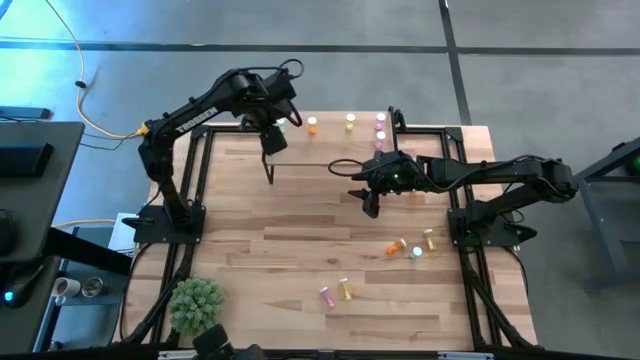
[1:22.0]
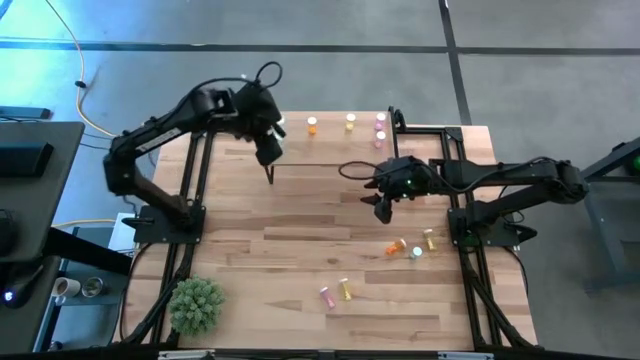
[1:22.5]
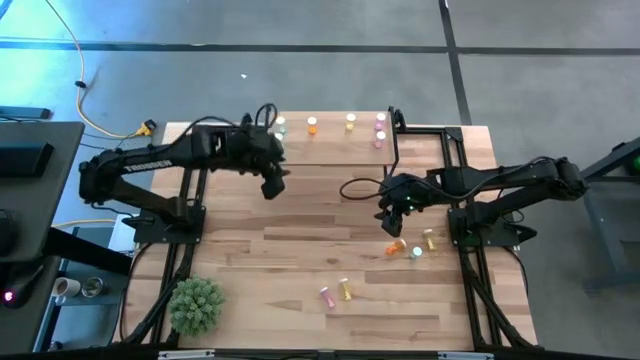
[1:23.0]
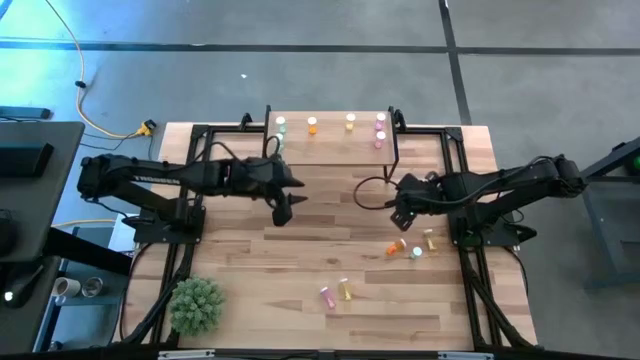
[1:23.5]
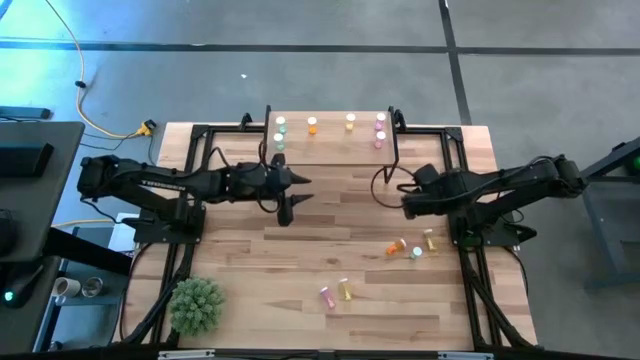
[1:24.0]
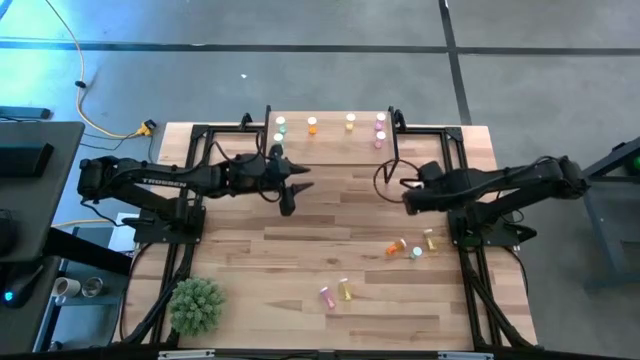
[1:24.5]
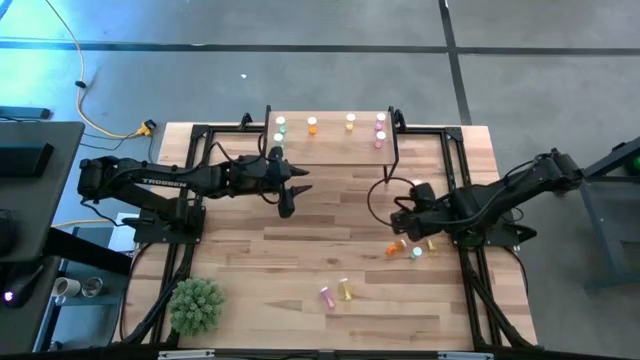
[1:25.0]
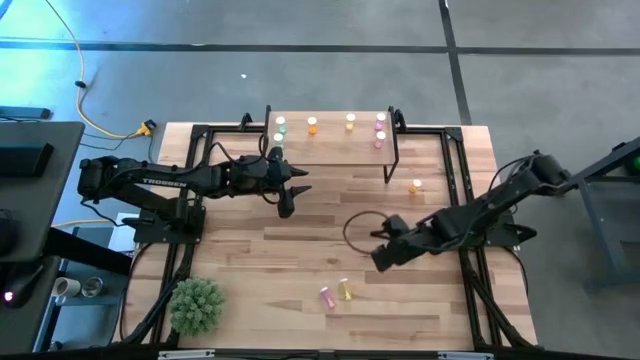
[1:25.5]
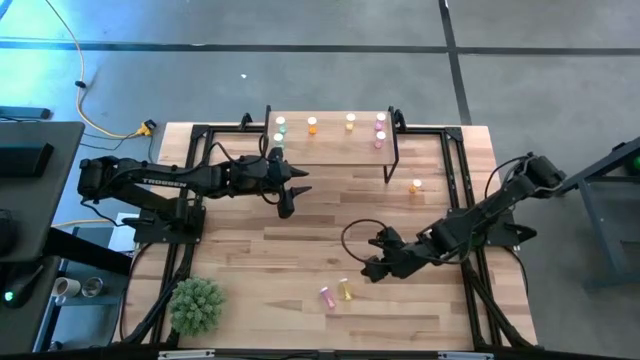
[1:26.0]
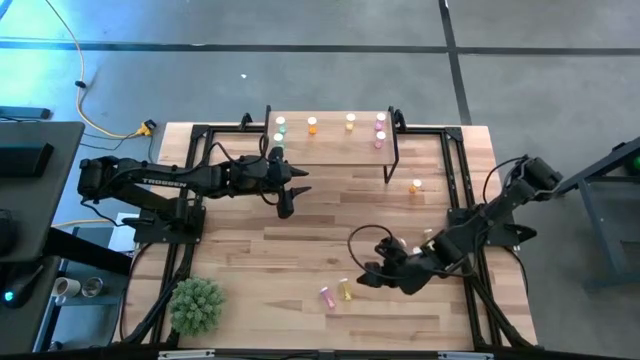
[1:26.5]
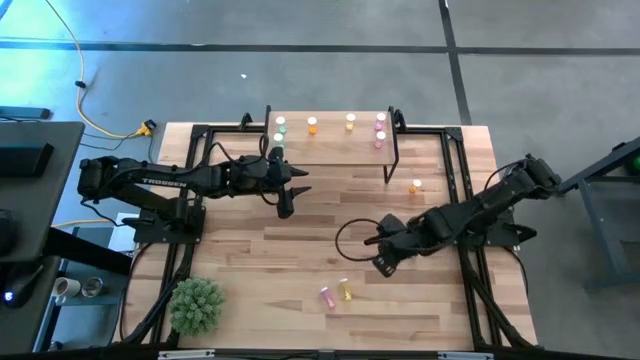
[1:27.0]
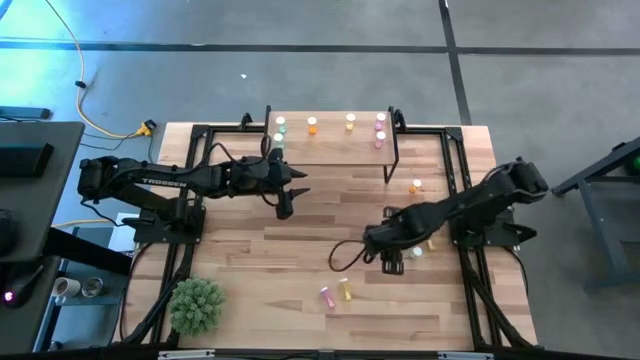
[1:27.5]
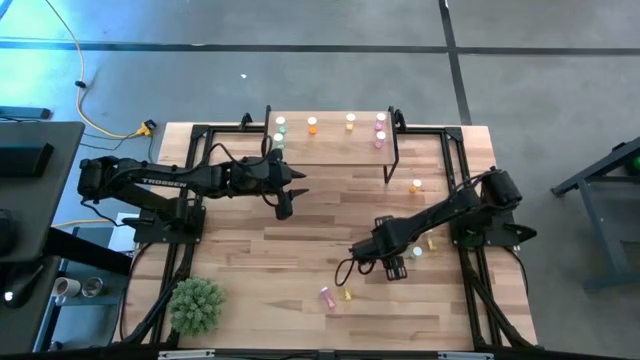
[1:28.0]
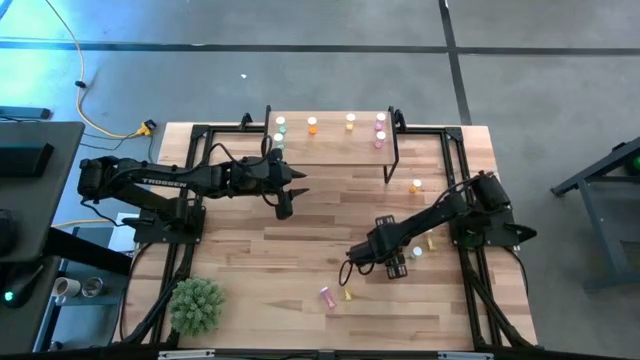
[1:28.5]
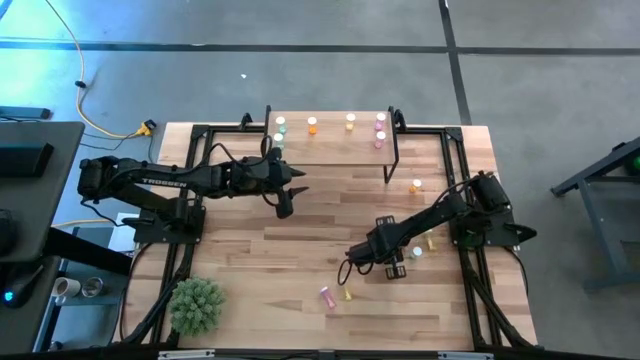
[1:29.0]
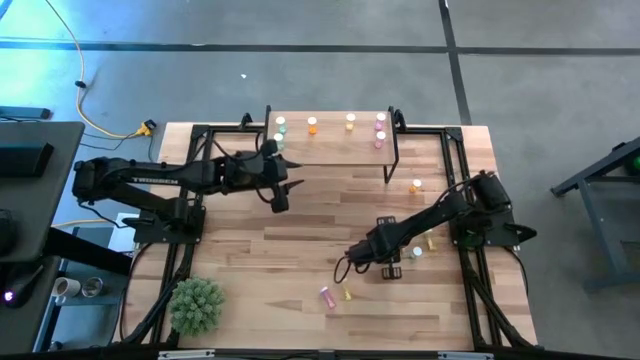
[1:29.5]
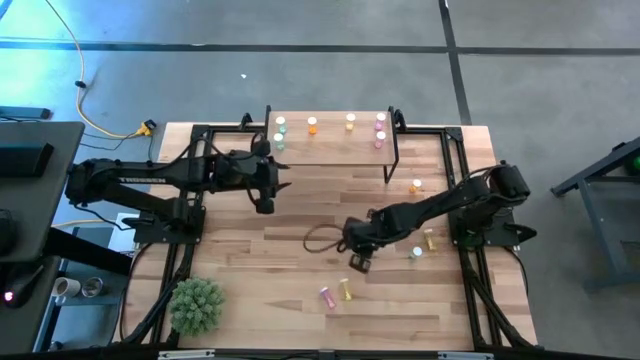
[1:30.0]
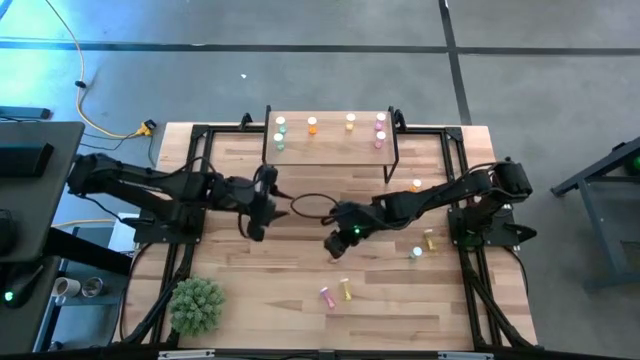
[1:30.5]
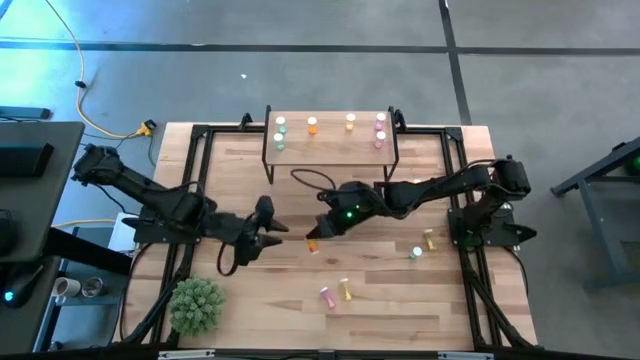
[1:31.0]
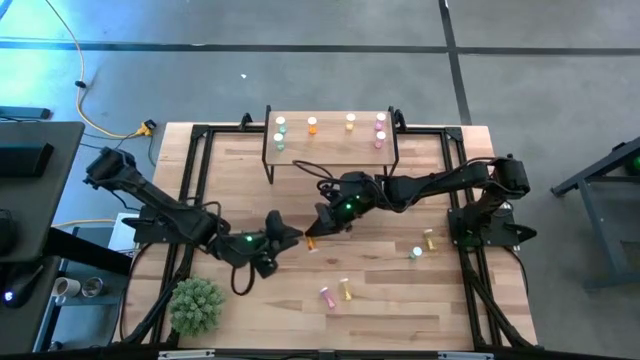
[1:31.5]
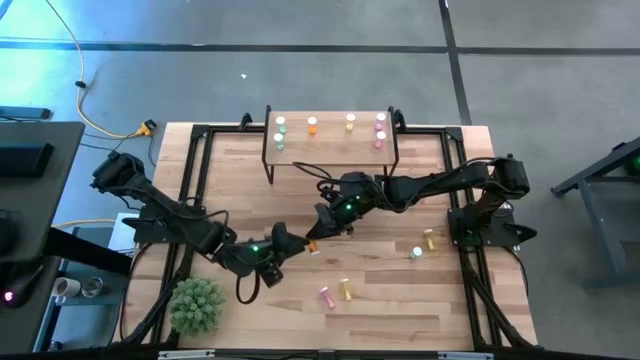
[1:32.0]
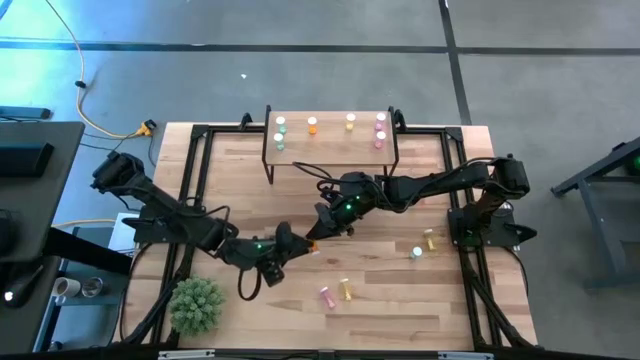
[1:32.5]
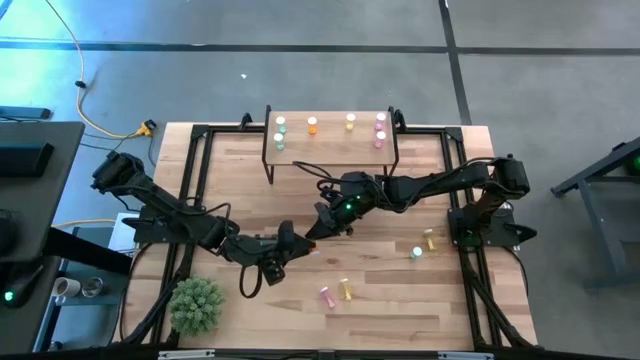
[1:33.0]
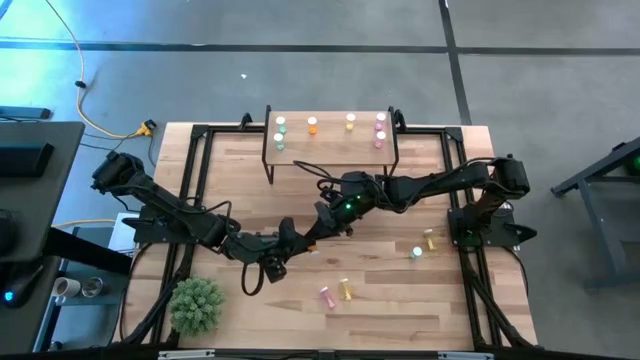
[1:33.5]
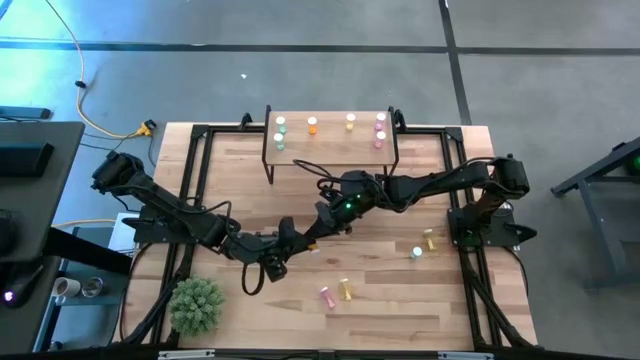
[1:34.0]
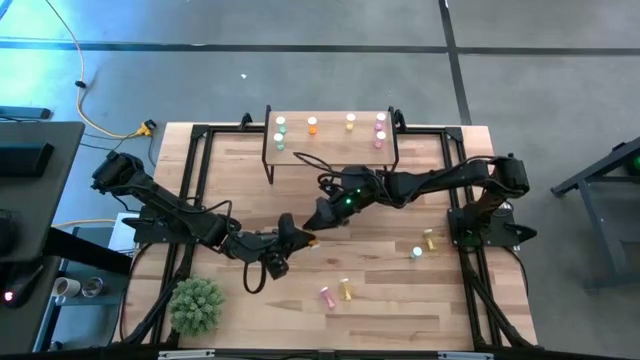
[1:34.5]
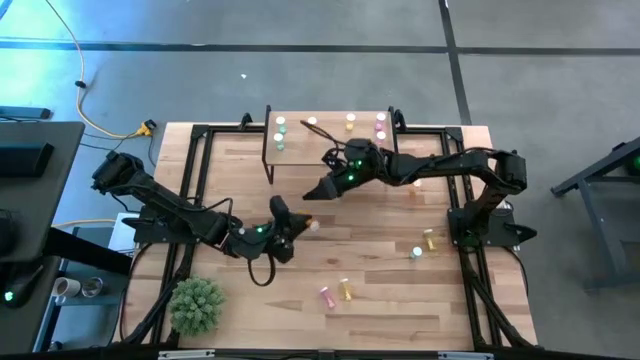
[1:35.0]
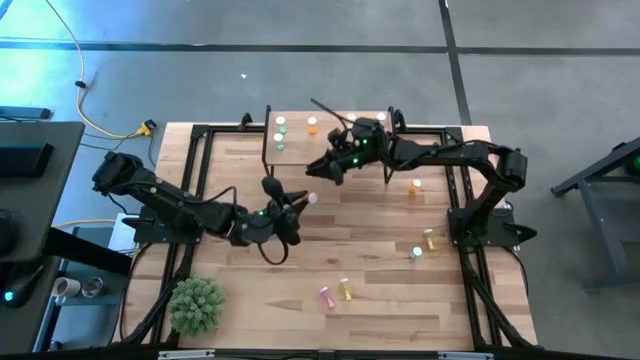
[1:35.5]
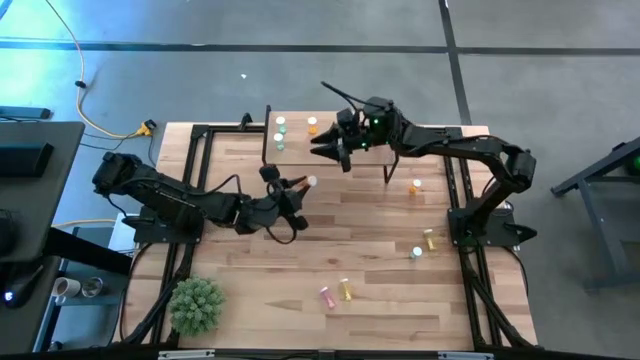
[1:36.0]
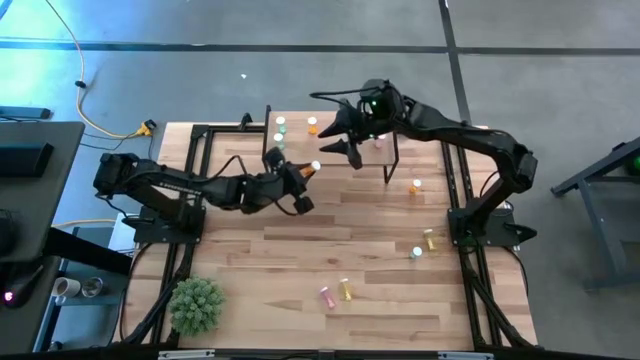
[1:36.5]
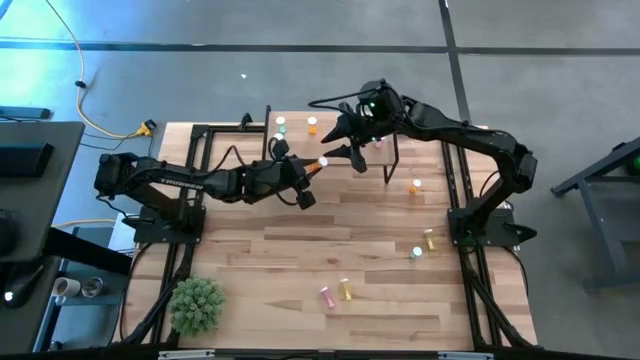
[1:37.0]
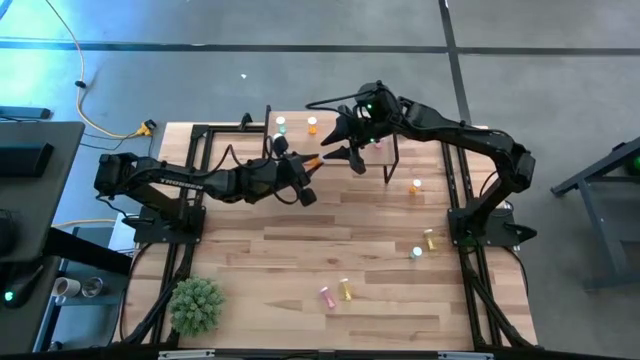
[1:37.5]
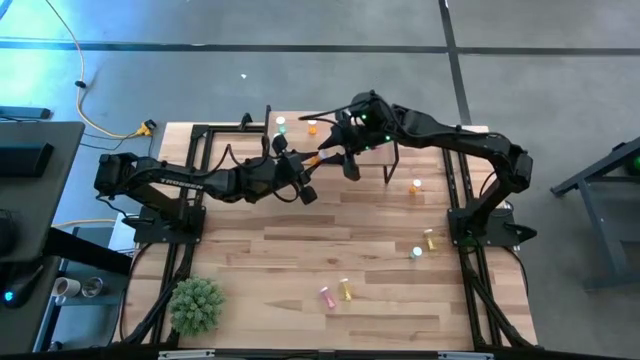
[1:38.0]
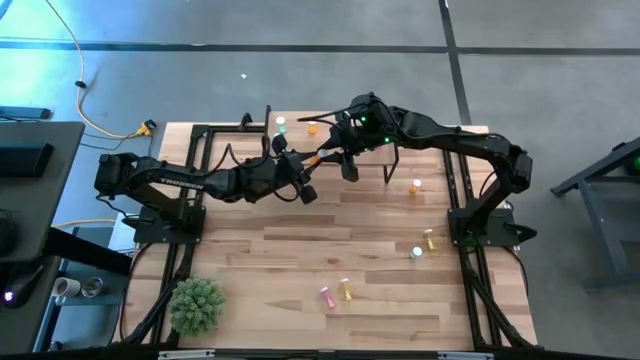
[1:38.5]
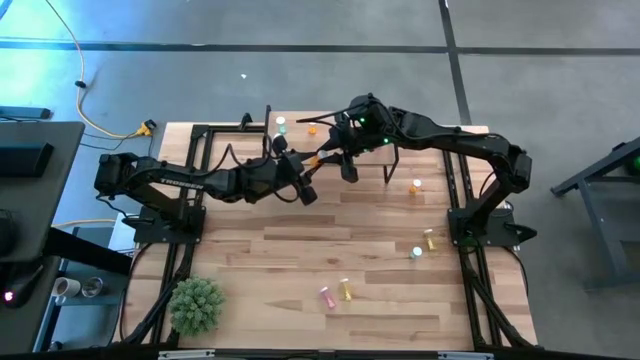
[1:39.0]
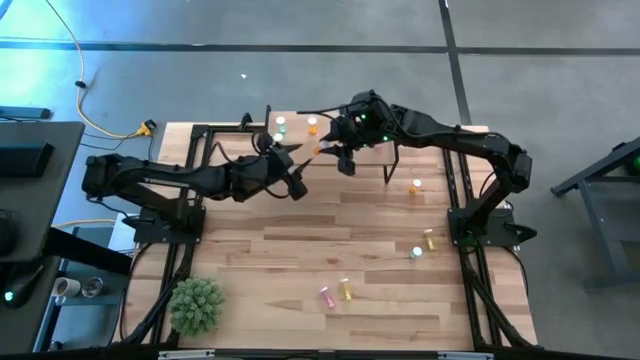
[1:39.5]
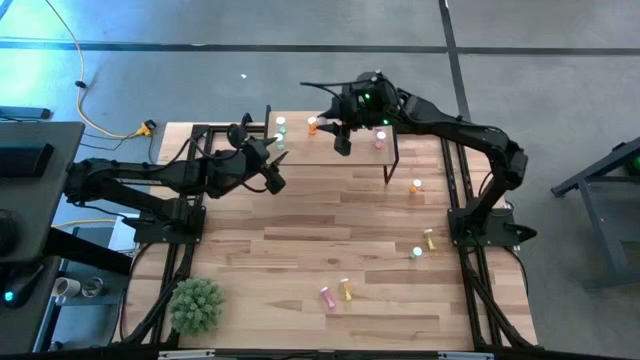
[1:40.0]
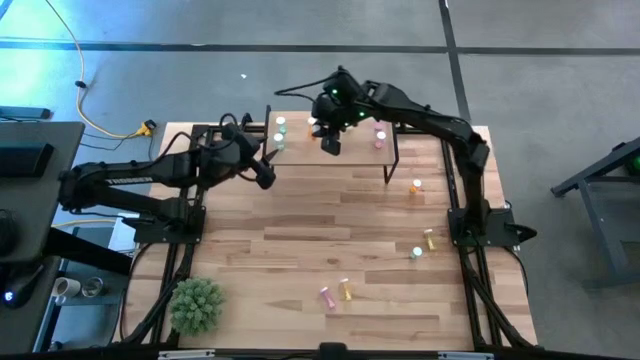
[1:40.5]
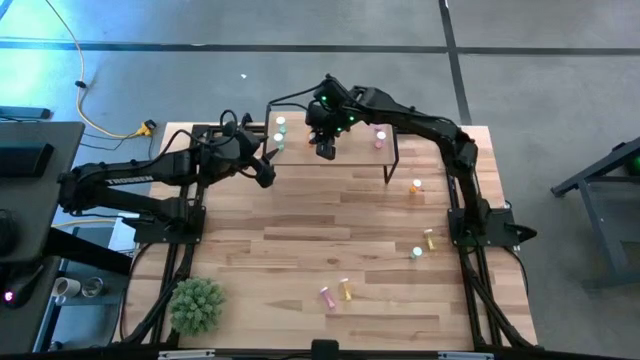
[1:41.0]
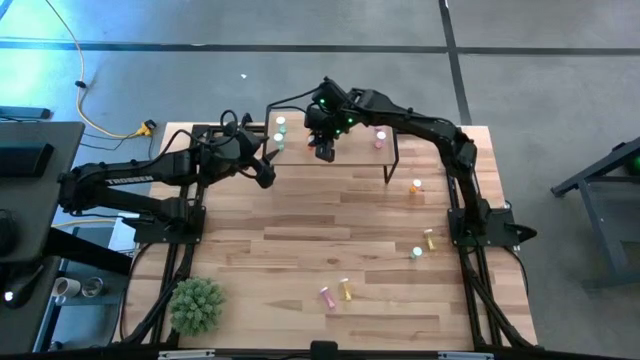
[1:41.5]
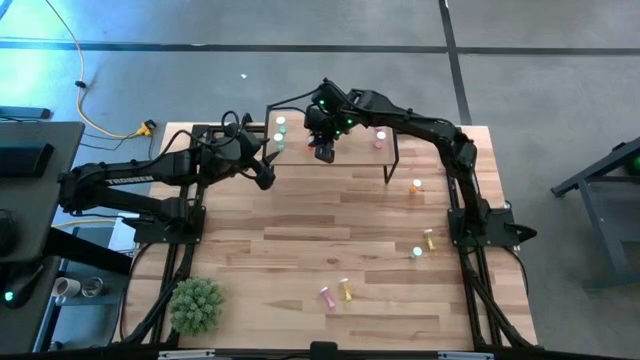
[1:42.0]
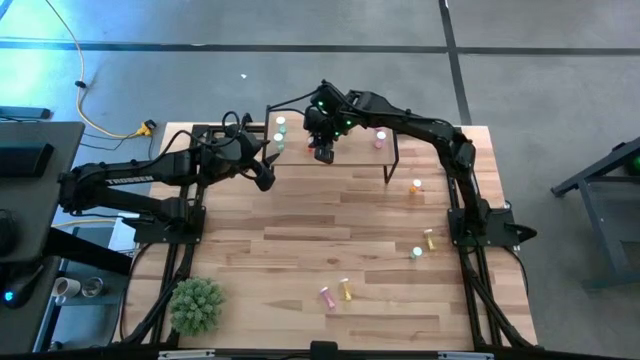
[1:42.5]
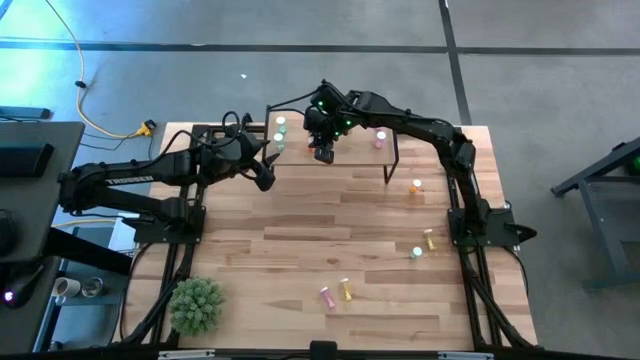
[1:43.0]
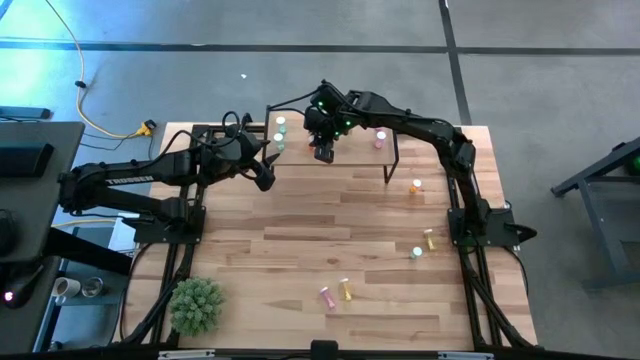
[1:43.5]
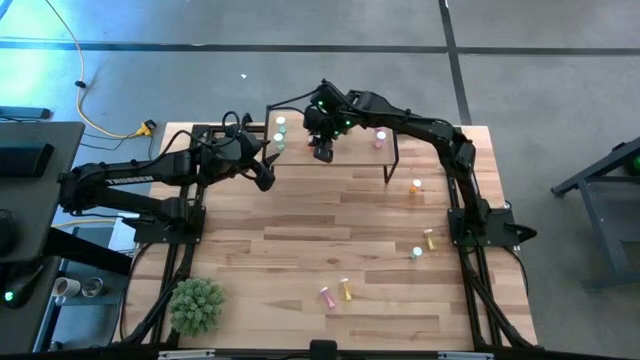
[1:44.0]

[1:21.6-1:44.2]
Task: Pick and place medicine bottles onto shelf by color
Put the bottom orange pill bottle on the shelf aligned with the other orange pill bottle
